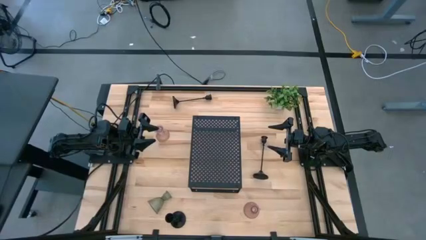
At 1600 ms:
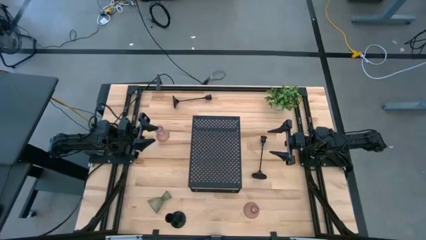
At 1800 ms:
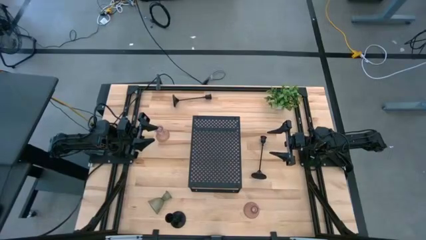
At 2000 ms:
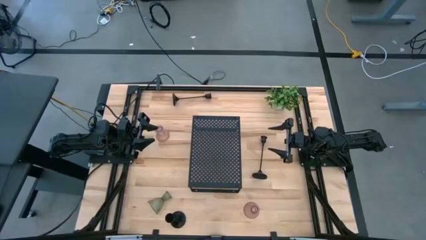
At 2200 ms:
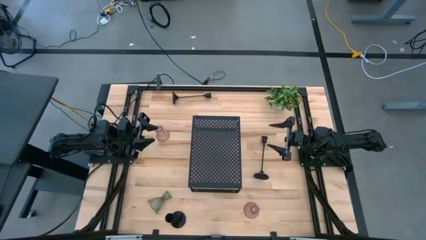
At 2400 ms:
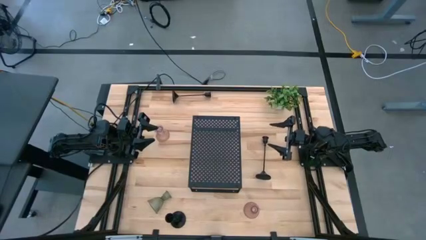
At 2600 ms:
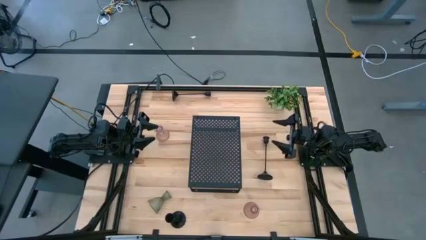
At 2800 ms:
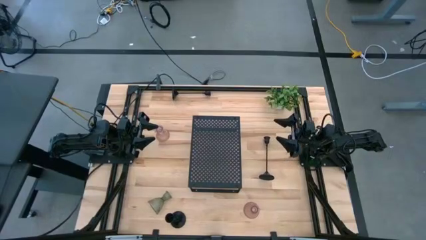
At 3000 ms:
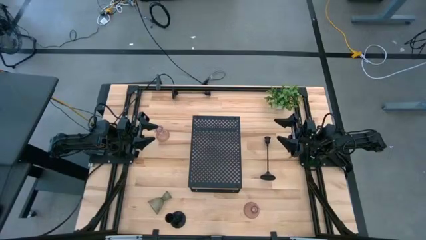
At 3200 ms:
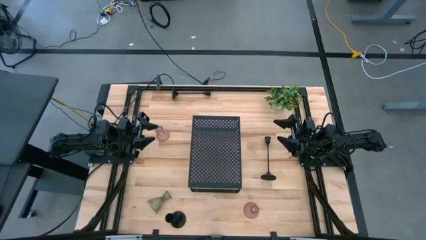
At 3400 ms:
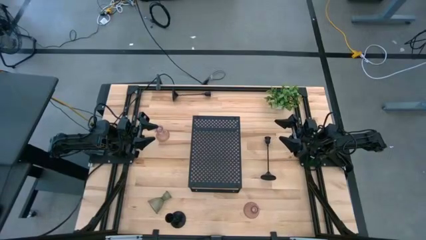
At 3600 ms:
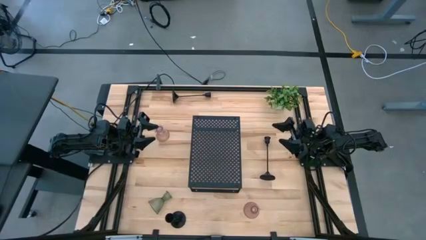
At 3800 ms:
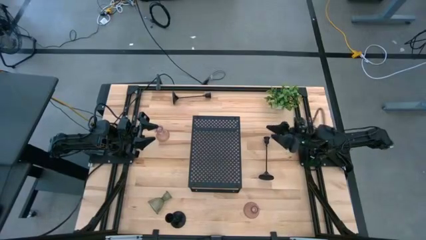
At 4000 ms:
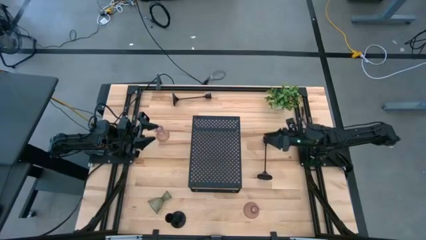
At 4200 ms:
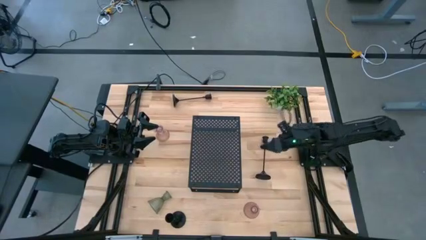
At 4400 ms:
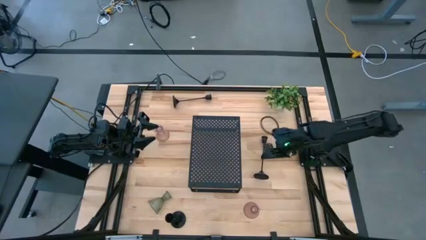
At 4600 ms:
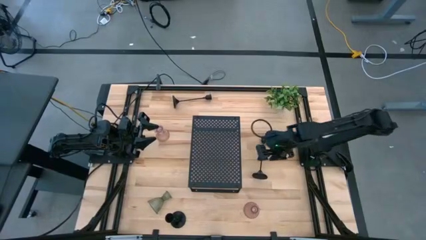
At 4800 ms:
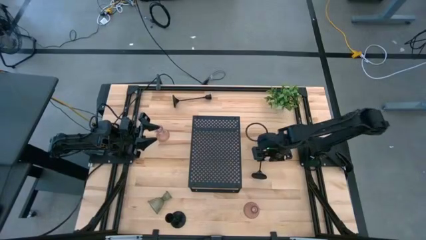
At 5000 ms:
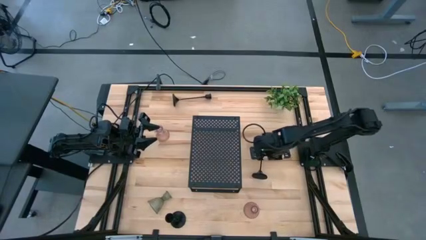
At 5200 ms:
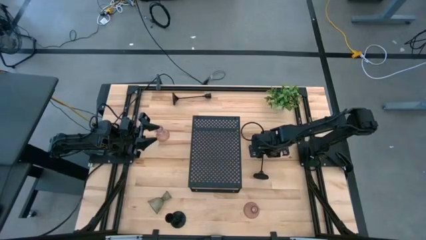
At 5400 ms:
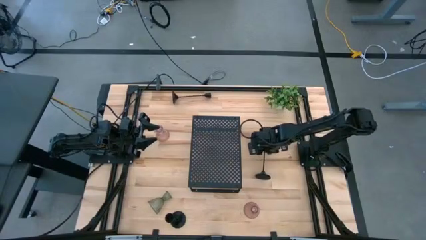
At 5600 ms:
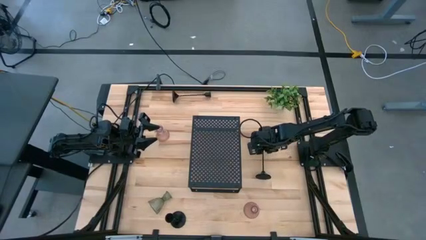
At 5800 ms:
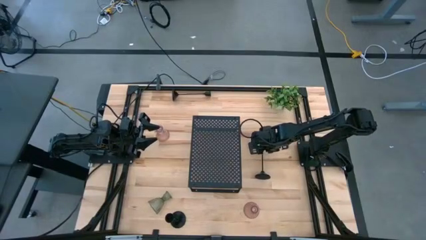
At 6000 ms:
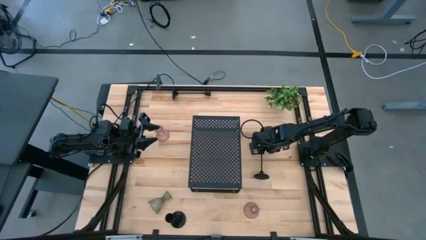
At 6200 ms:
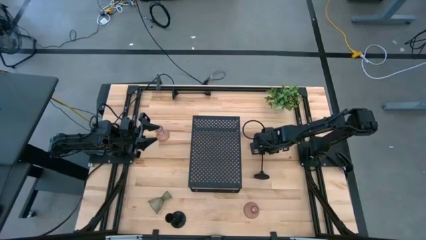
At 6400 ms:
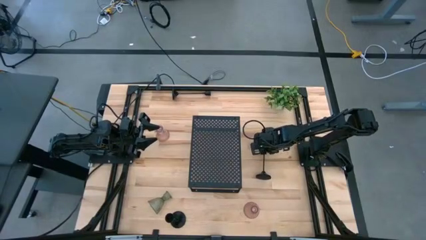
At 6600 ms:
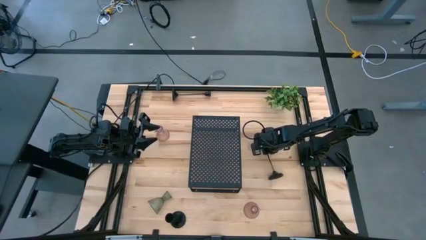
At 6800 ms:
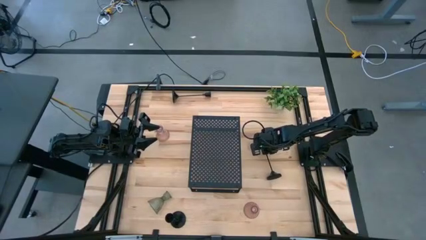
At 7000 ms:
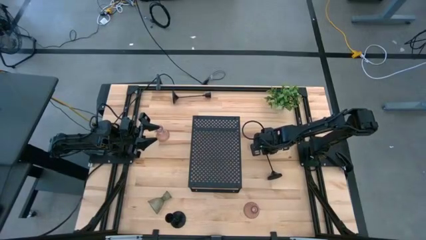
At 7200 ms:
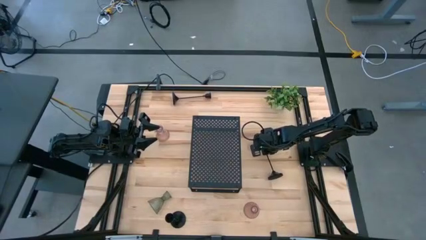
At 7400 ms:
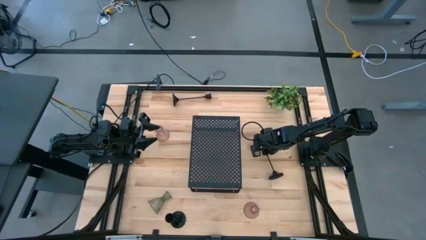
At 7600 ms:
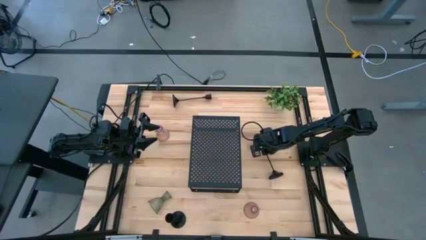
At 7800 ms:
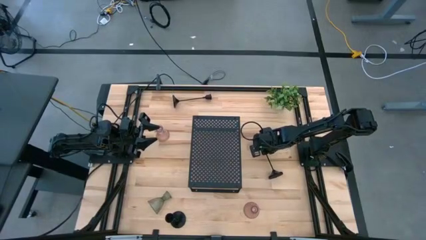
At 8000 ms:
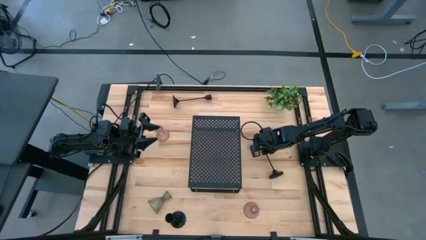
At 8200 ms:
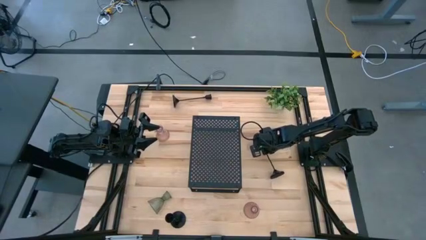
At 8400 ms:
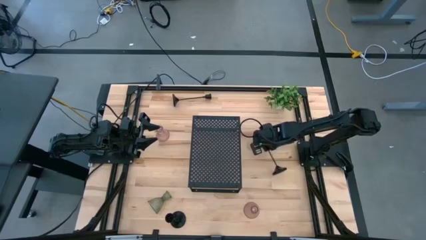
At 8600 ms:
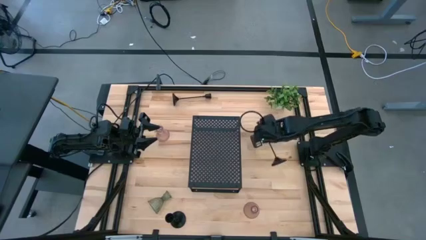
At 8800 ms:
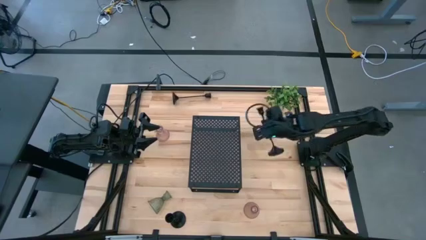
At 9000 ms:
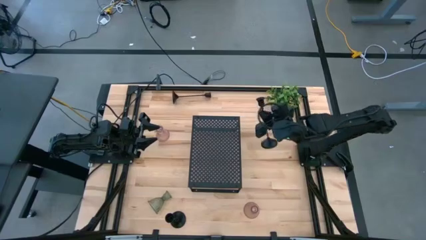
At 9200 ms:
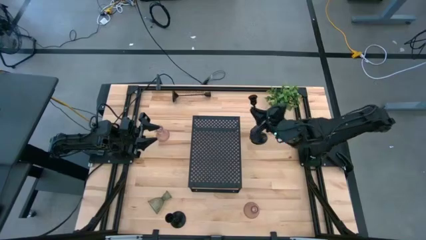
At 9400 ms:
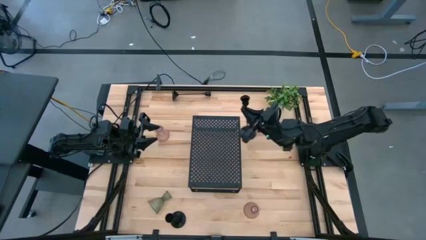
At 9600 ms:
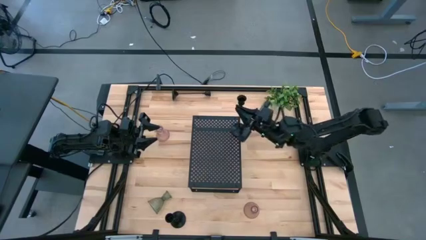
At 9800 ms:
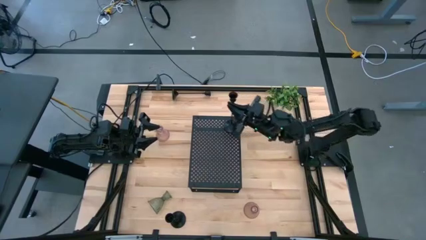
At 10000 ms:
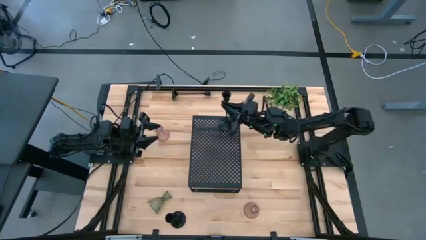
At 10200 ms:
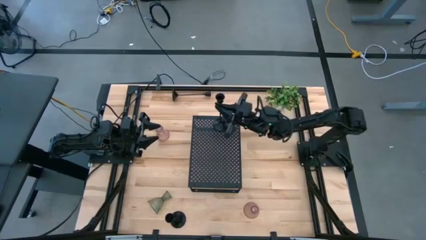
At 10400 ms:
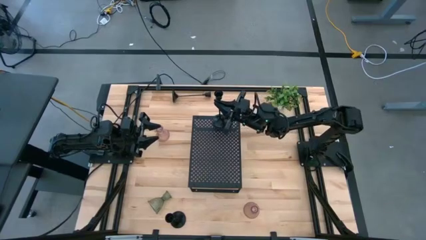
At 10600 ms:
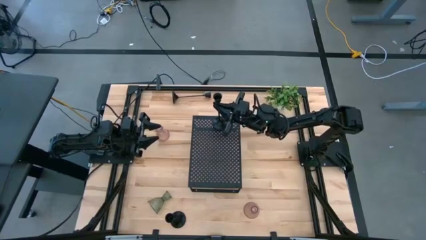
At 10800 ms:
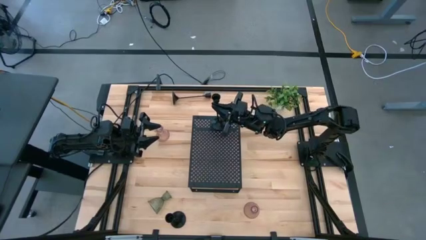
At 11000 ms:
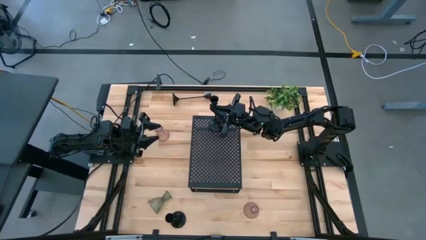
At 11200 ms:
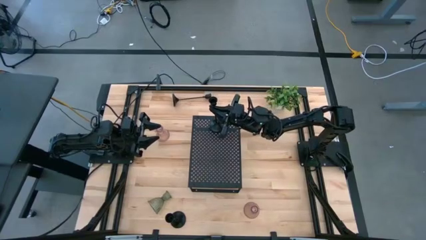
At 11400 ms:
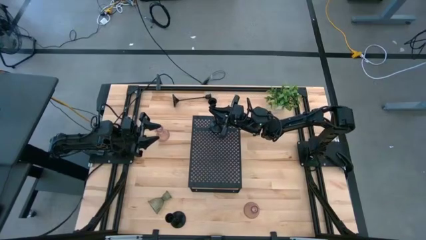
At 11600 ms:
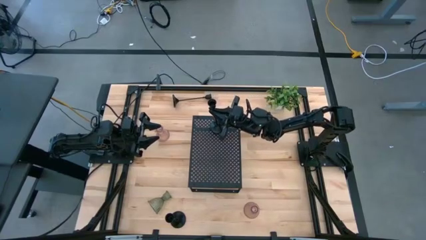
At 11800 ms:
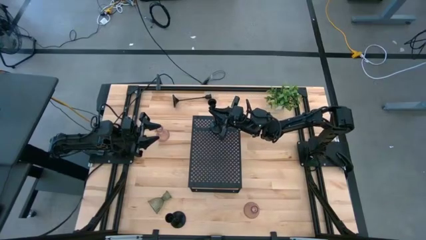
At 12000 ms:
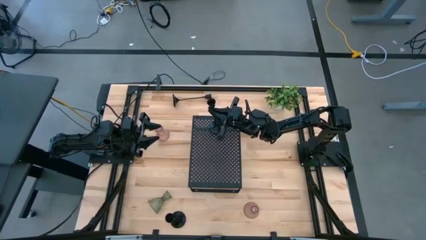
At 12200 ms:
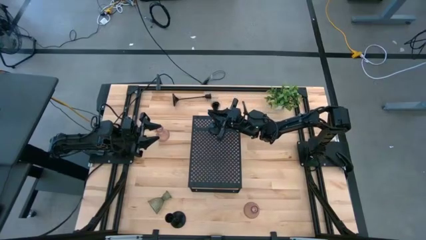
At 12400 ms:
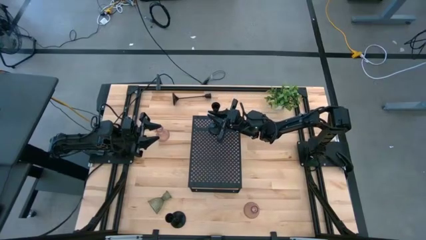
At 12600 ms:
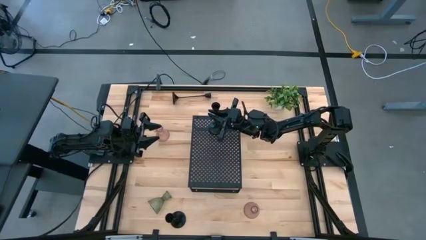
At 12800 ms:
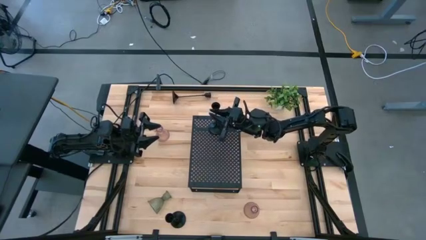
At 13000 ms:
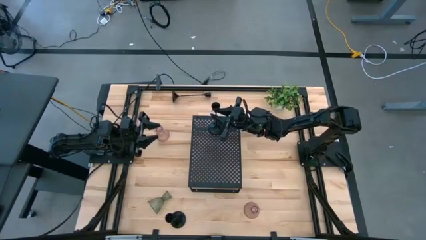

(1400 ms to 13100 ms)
Task: Pick & Place candle stick holders
Put the middle right black candle holder on the shelf
